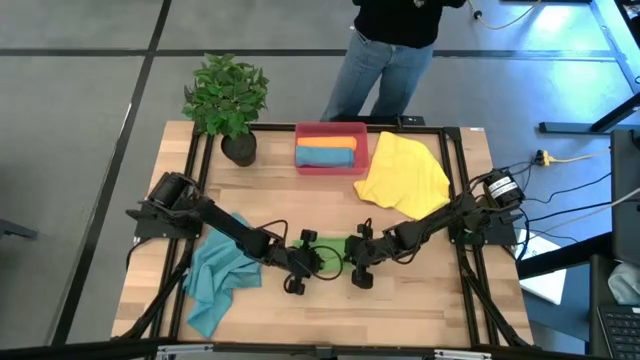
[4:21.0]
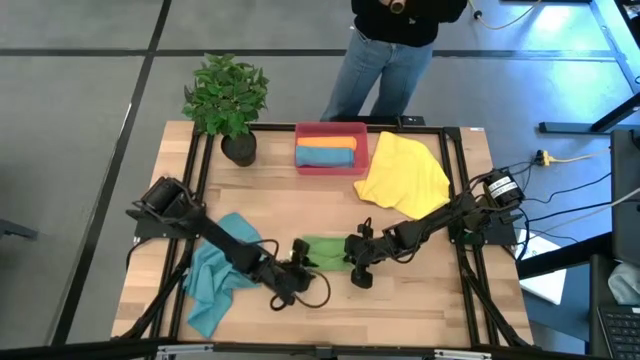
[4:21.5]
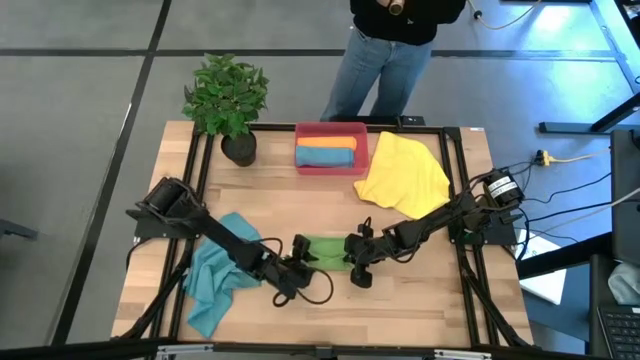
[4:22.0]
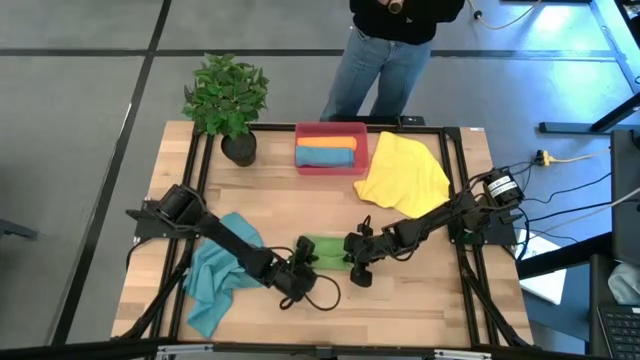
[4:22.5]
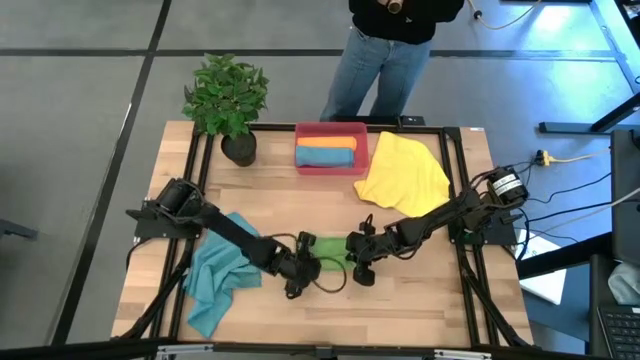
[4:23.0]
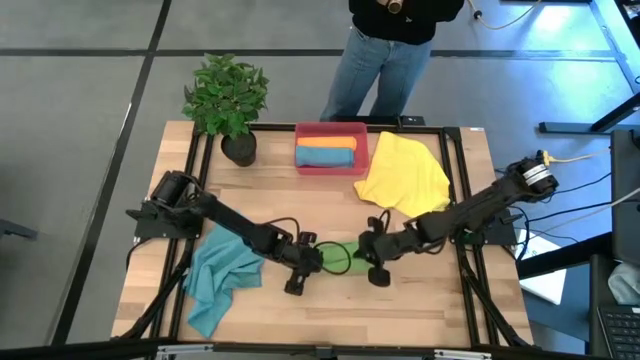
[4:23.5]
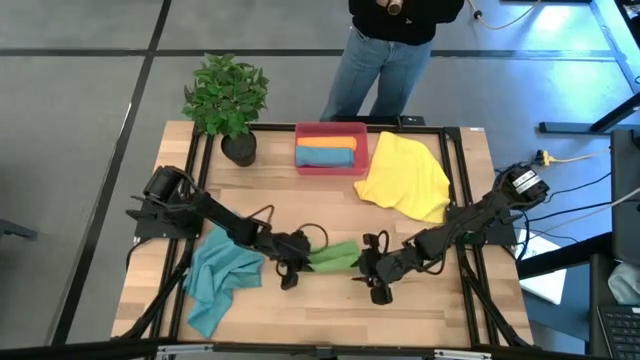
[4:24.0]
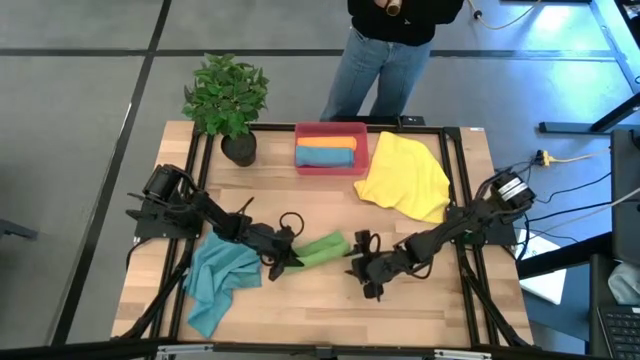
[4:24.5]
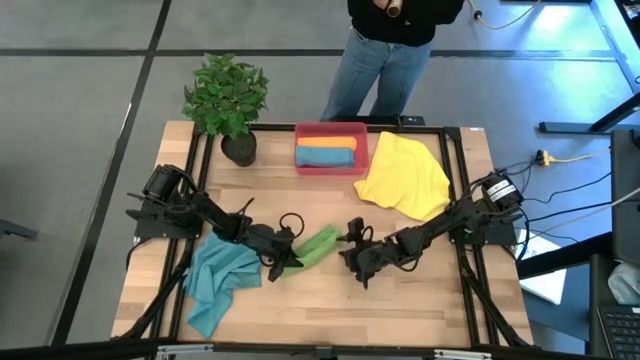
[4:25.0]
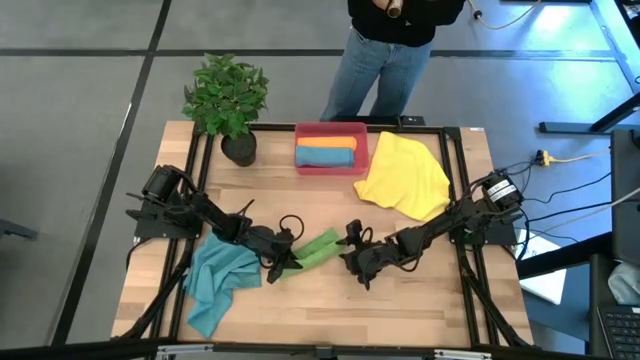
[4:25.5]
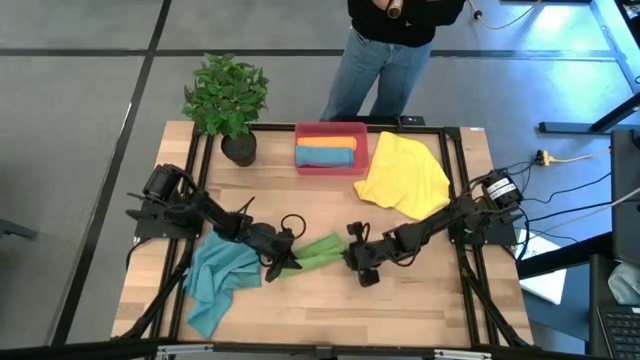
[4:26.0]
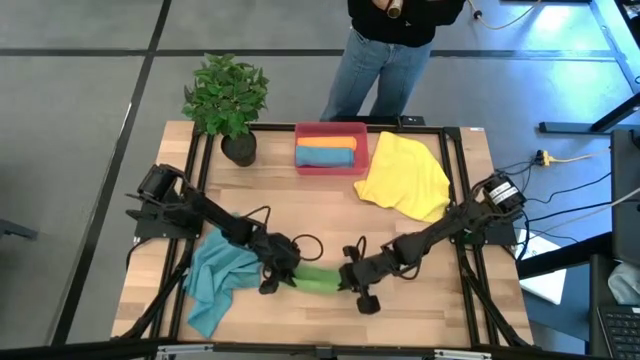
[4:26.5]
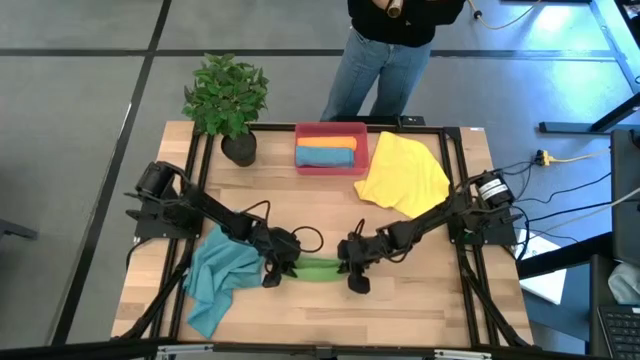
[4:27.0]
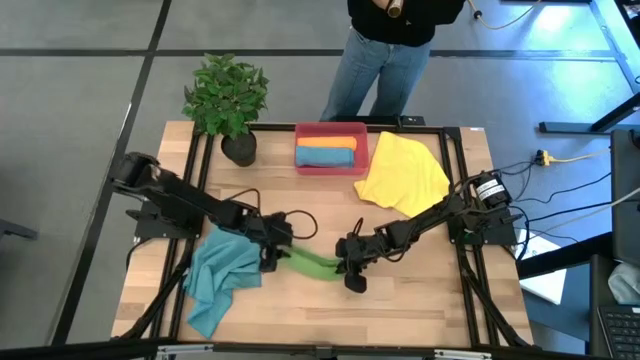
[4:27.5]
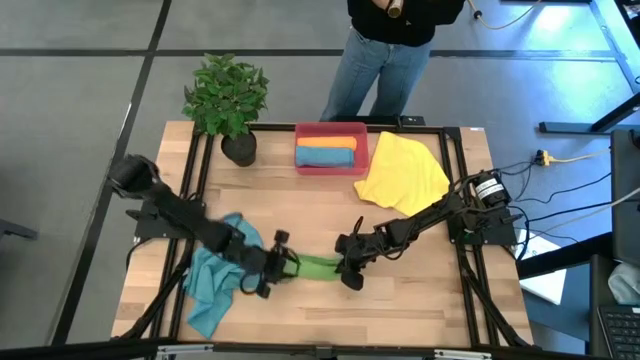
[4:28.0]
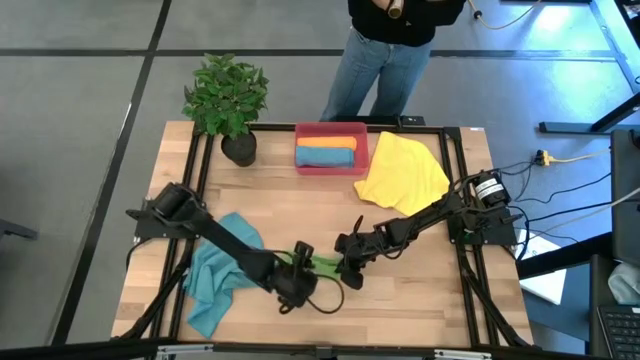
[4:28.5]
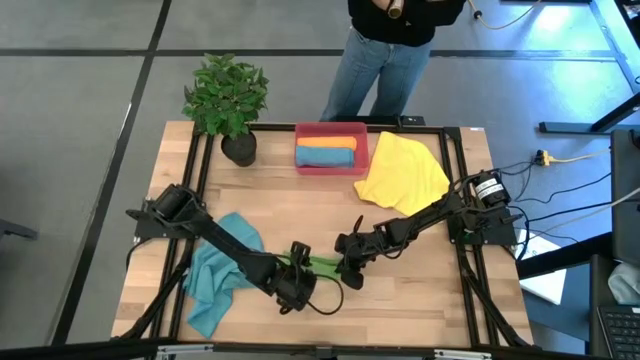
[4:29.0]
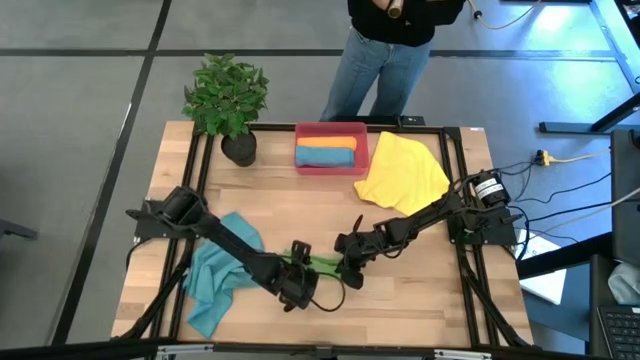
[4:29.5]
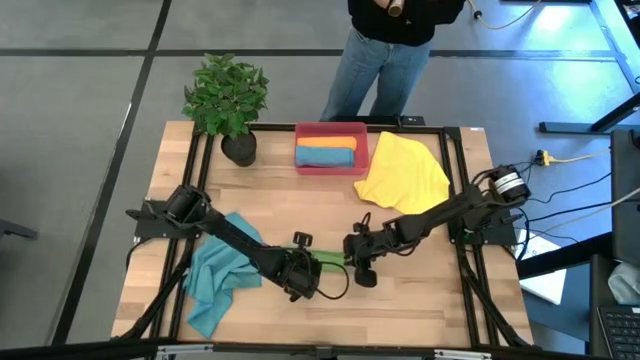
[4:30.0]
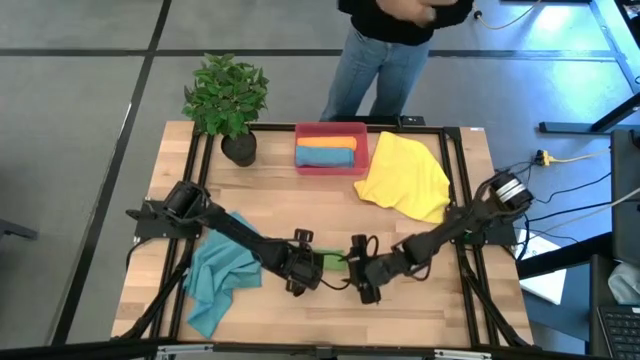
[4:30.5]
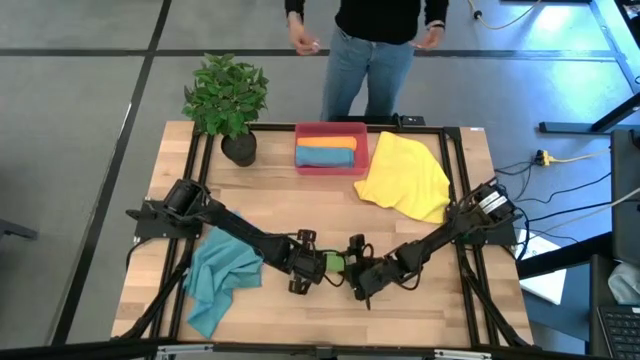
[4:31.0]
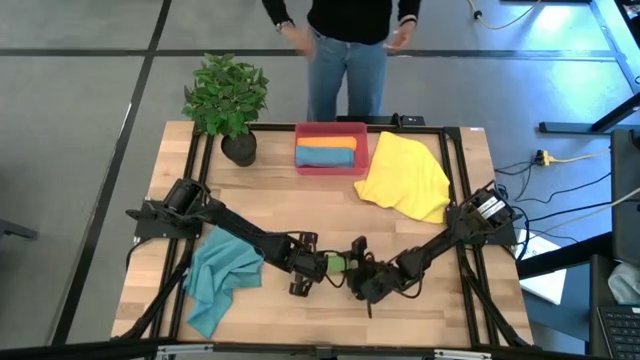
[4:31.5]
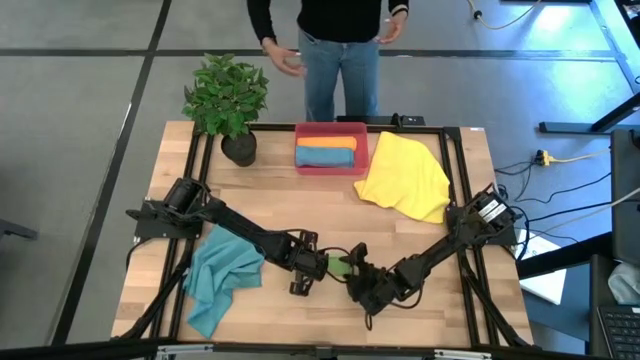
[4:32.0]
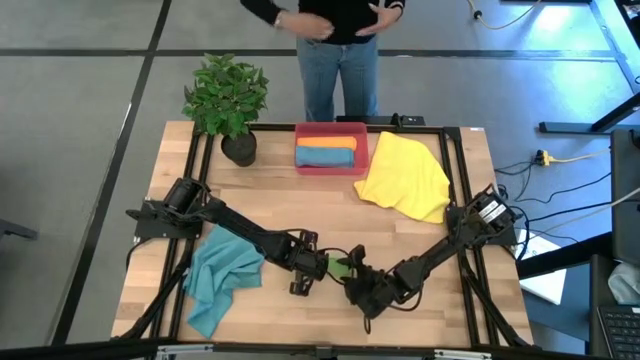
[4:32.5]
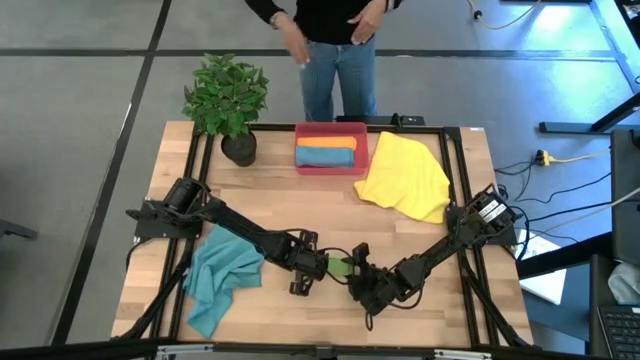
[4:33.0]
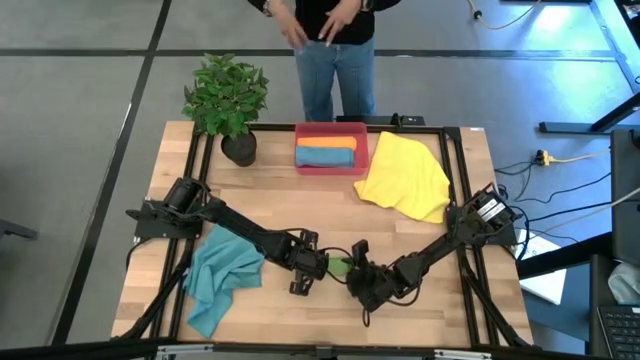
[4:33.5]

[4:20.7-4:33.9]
Task: Roll microfiber towels into tight, uniform cylinder then place into a basket
Roll the green towel

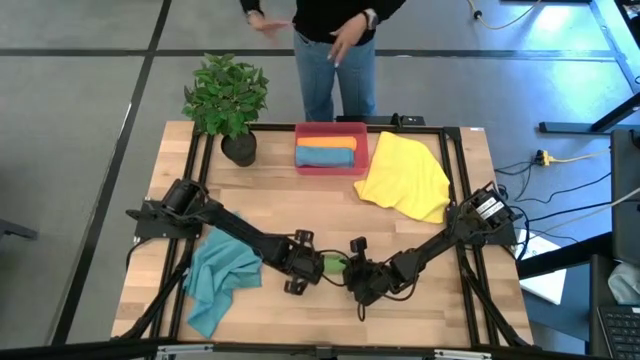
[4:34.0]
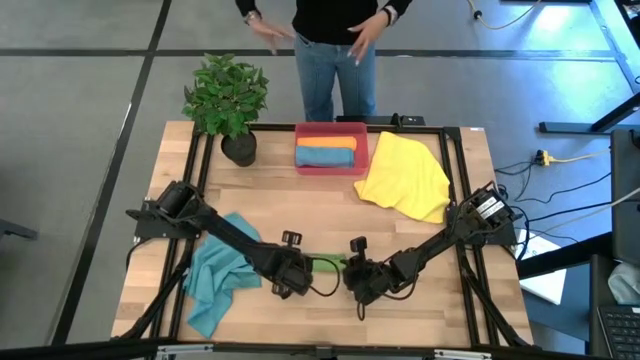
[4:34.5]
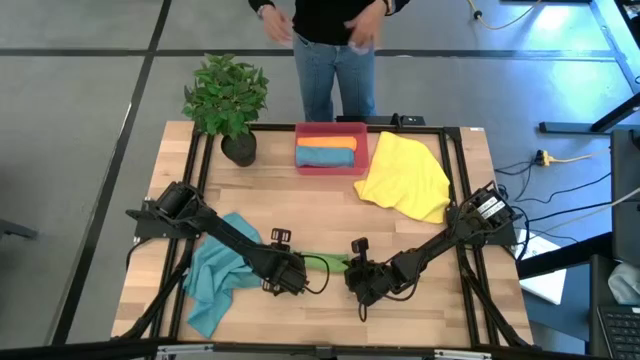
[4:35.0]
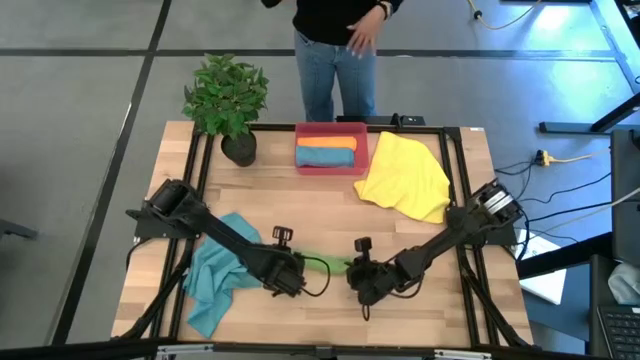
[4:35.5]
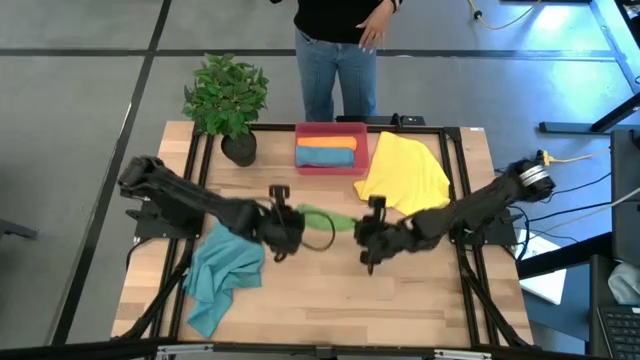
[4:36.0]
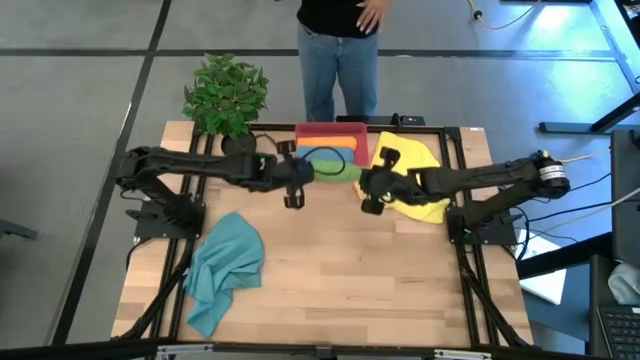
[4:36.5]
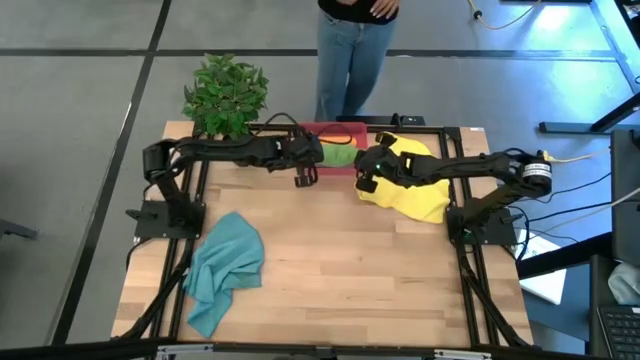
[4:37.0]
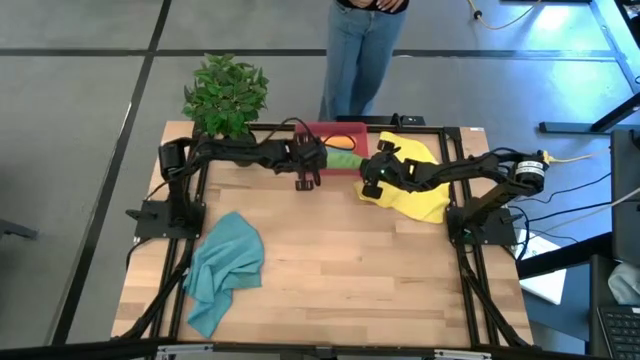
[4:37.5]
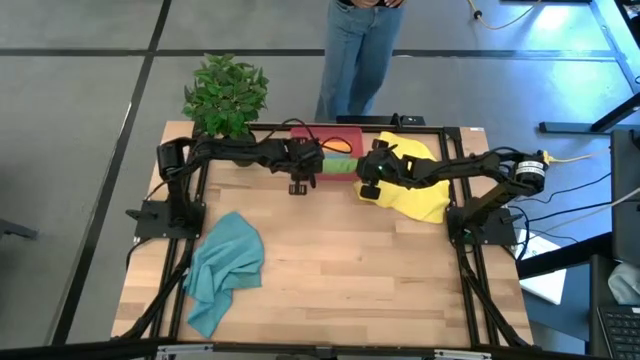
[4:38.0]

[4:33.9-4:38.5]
Put the rolled green towel into the red bin

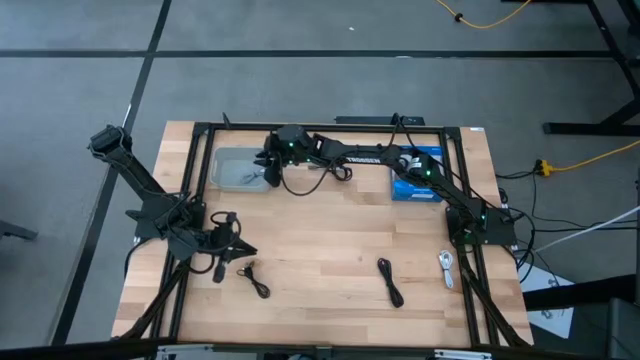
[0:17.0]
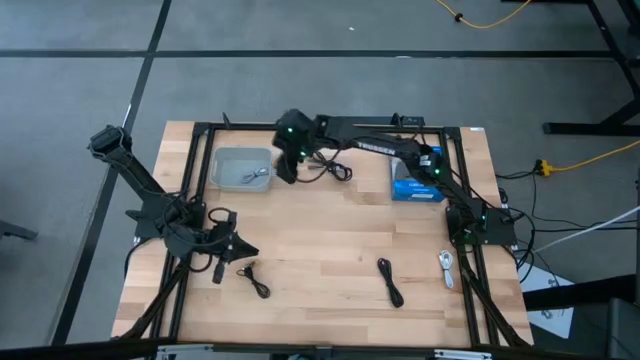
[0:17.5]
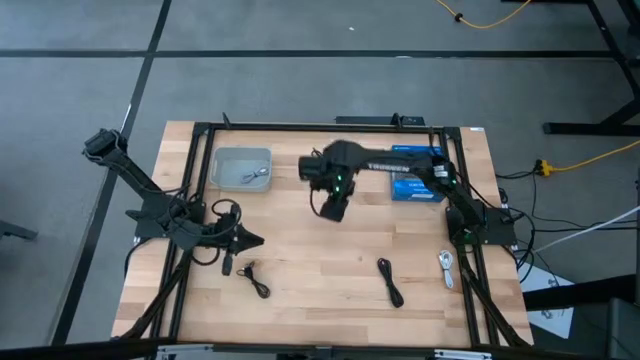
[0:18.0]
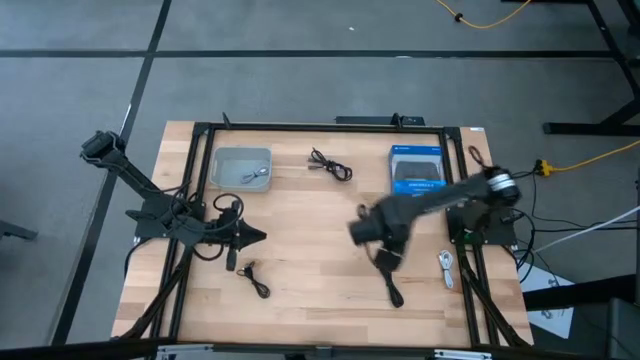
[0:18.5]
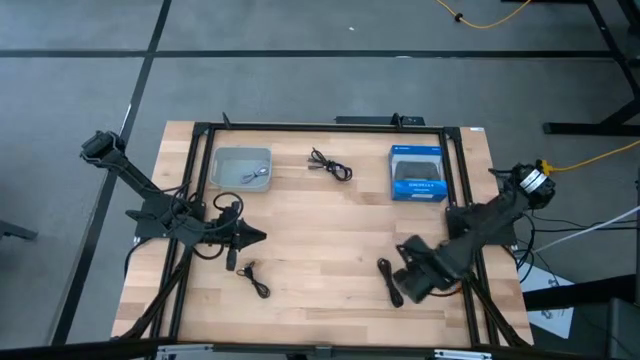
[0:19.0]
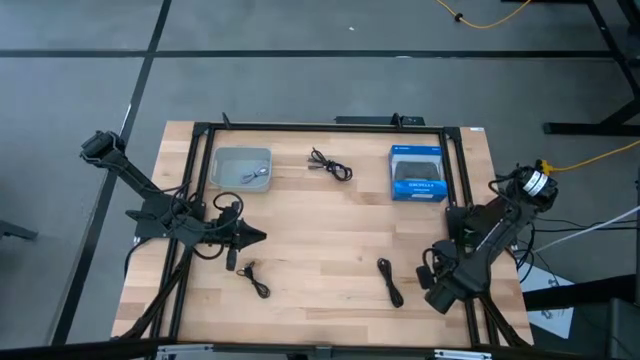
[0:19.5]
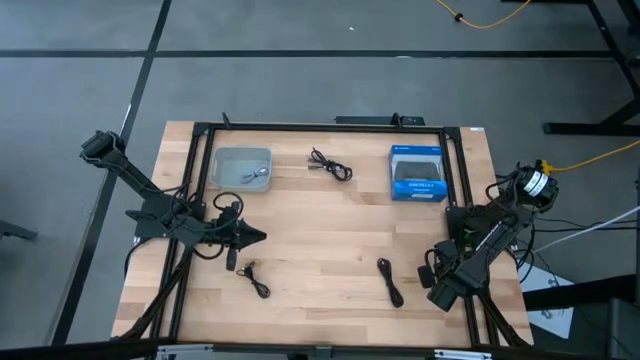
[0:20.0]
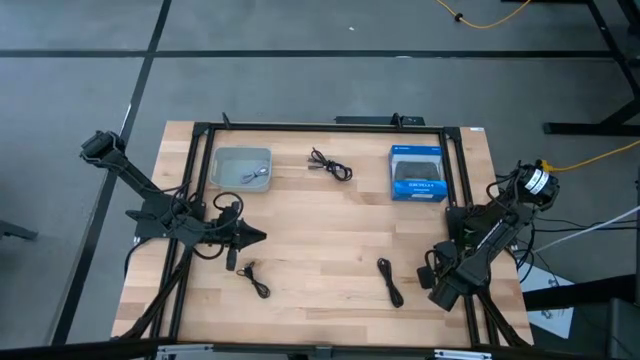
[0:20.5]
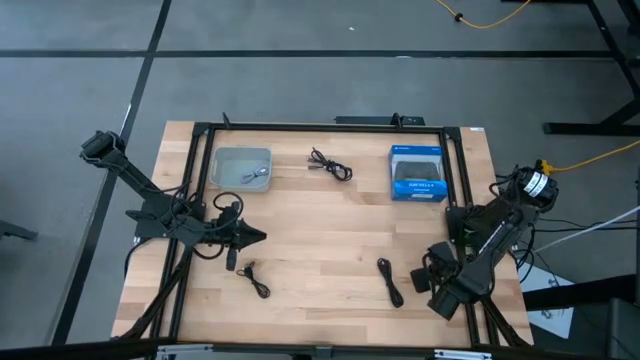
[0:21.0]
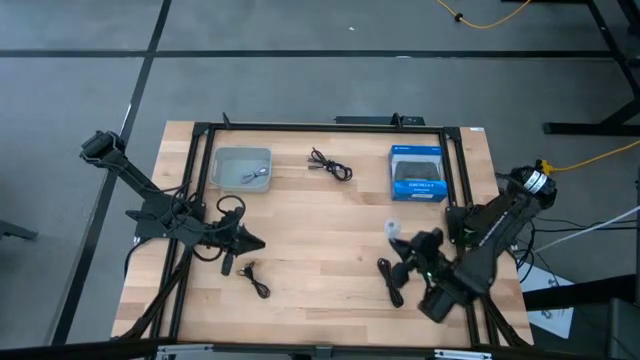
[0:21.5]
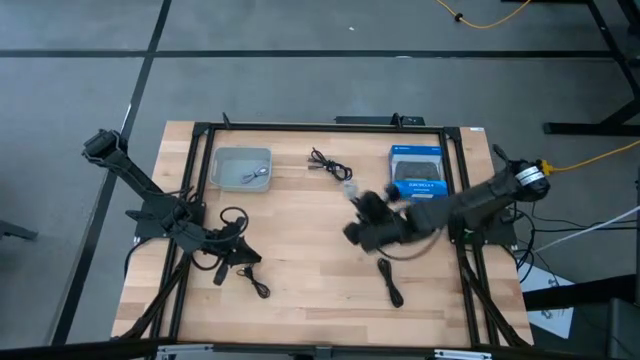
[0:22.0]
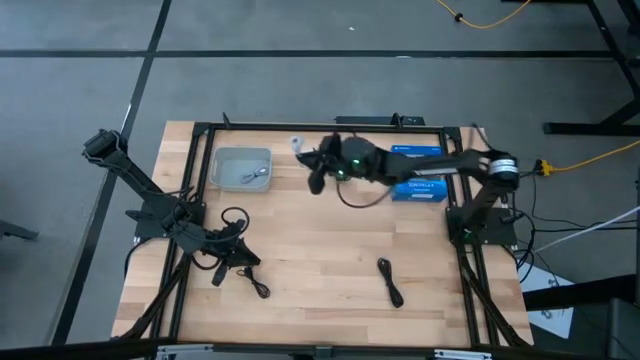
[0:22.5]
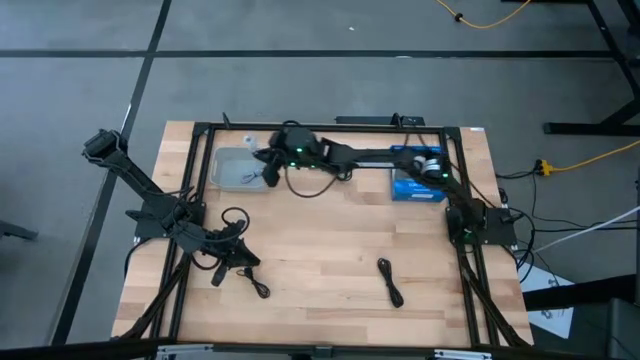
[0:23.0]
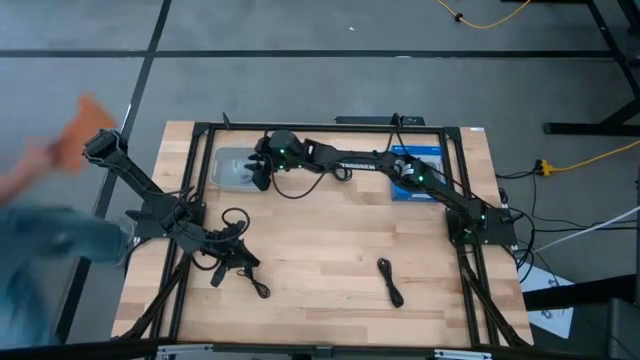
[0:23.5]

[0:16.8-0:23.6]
Task: Pick and place USB-C Cables
Put the white charger cable into the gray bin
